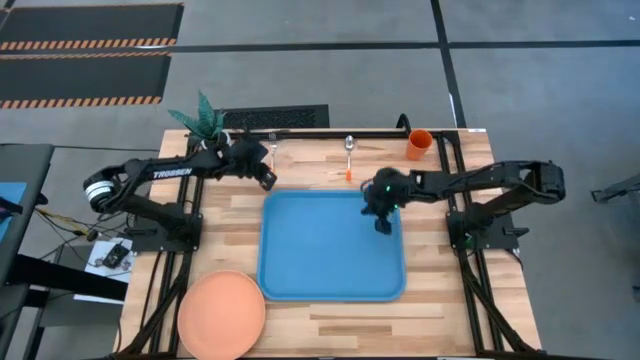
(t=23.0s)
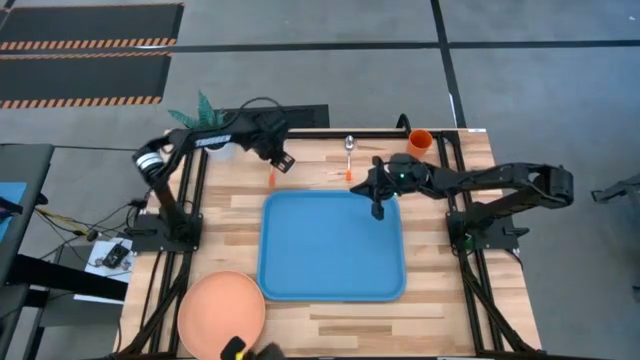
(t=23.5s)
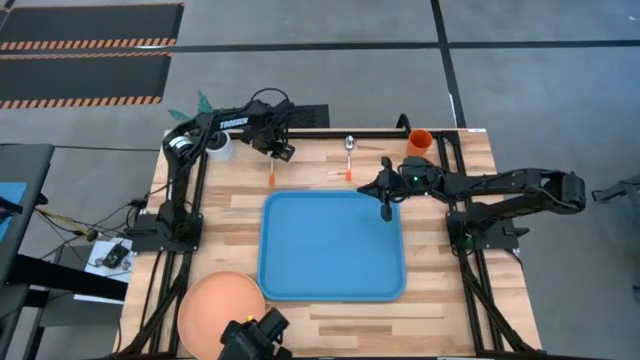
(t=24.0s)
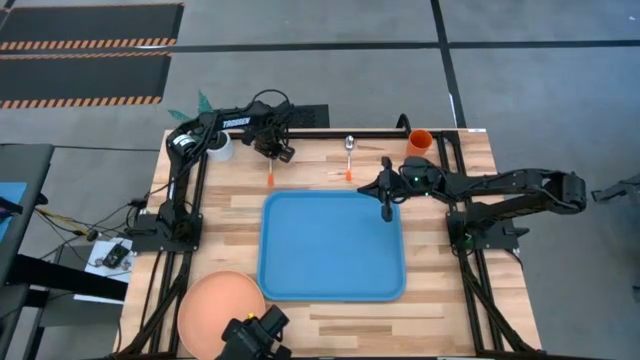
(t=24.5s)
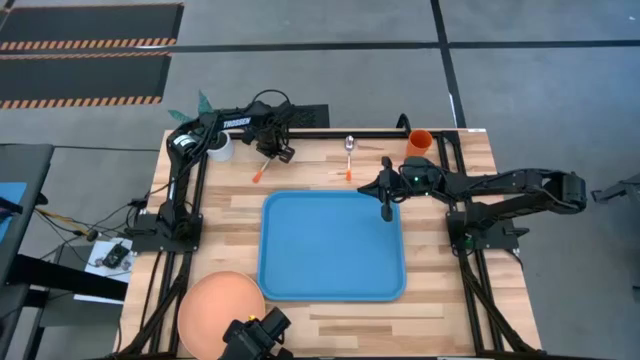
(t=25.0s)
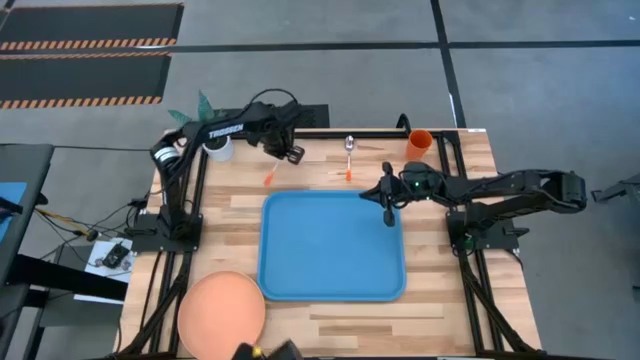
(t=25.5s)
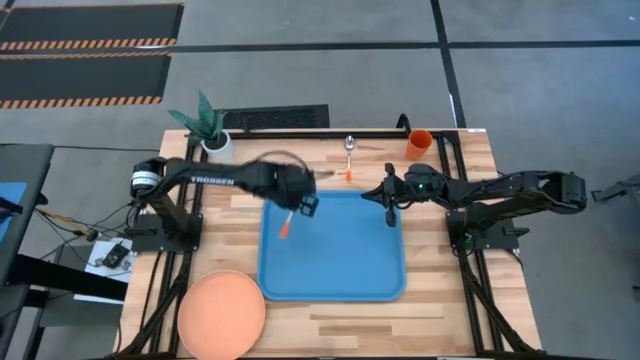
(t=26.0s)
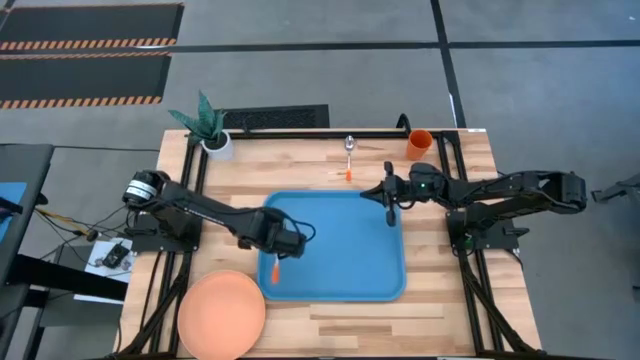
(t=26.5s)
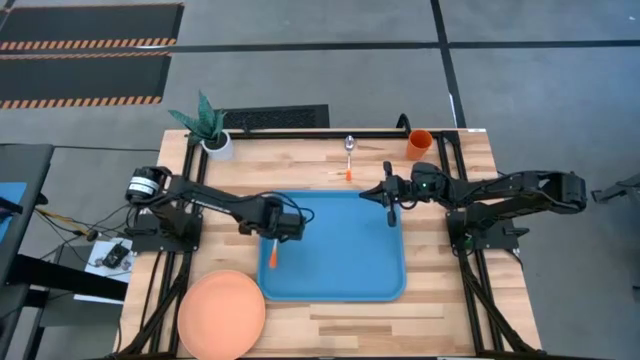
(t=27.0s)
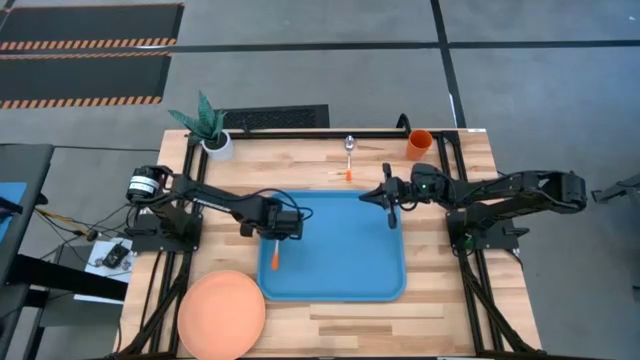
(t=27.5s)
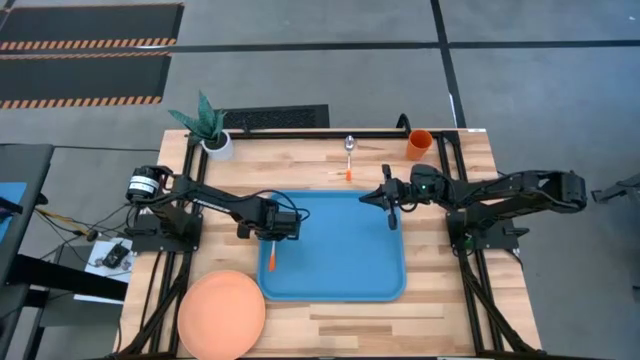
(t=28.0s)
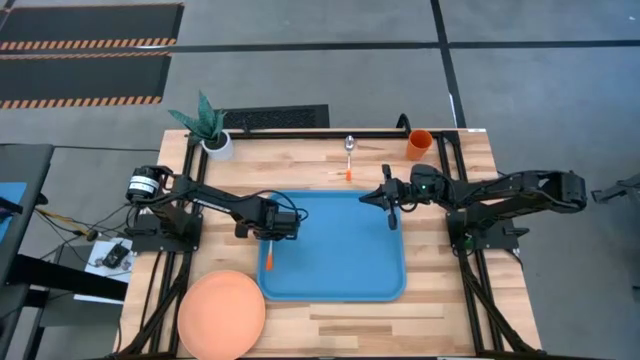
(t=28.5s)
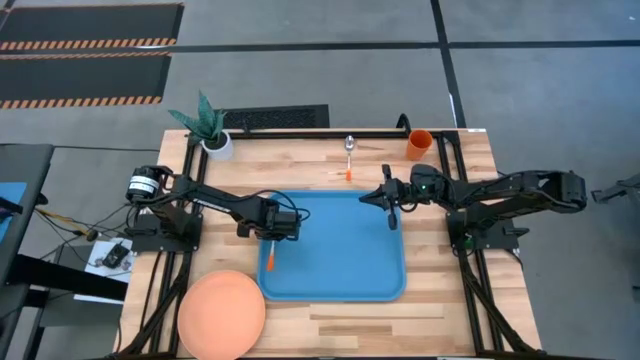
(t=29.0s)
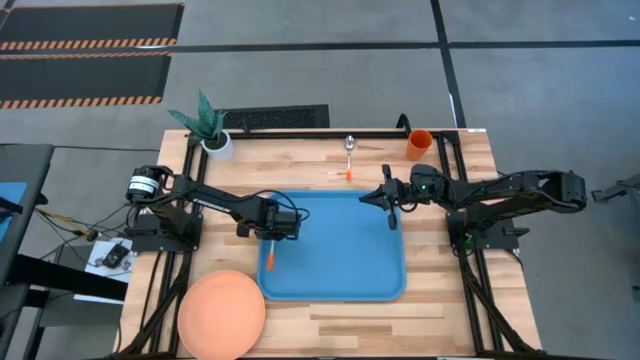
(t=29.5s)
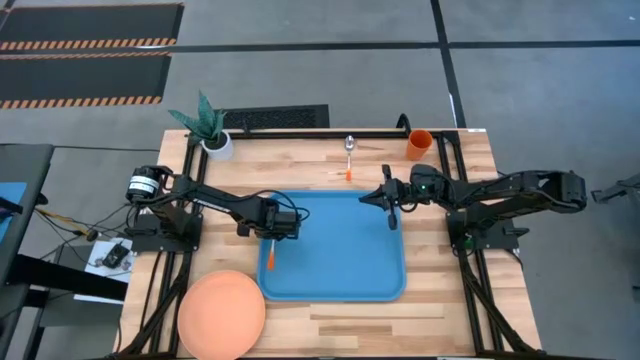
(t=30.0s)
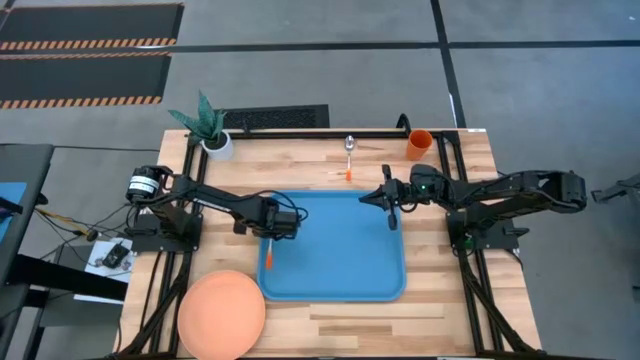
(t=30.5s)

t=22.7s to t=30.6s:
Task: Pick and place plate/cup/fork/spoon on tray
Put the orange fork on the blue serving tray

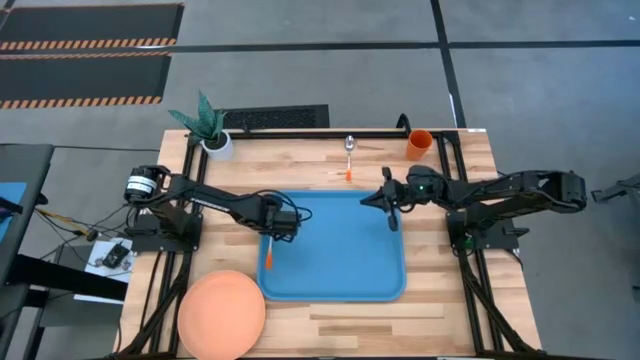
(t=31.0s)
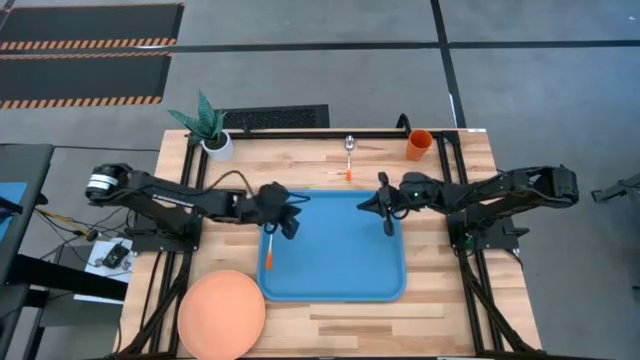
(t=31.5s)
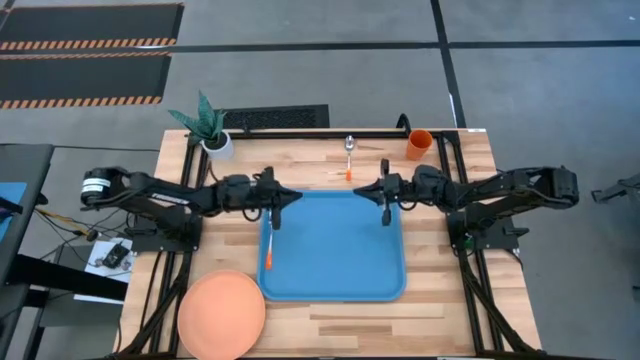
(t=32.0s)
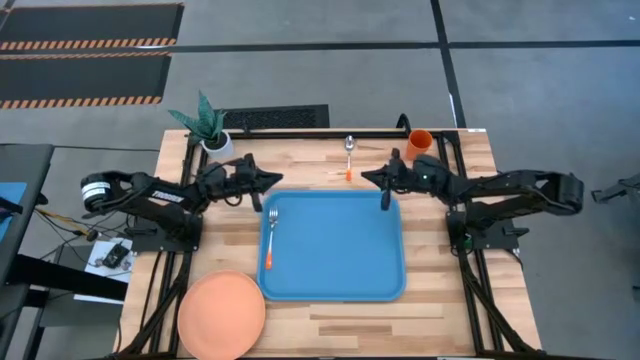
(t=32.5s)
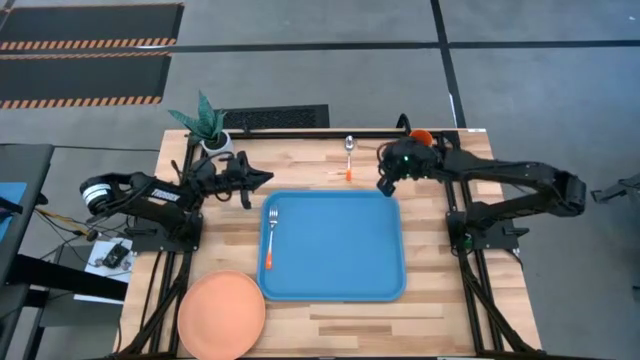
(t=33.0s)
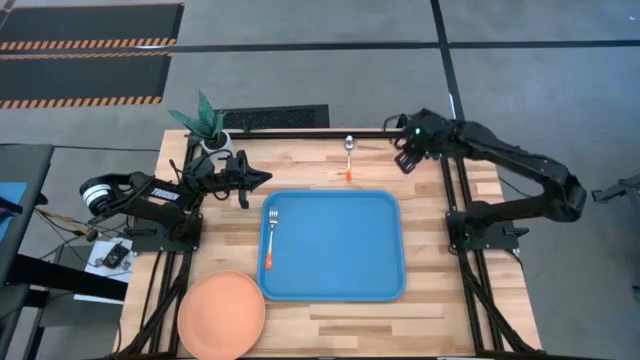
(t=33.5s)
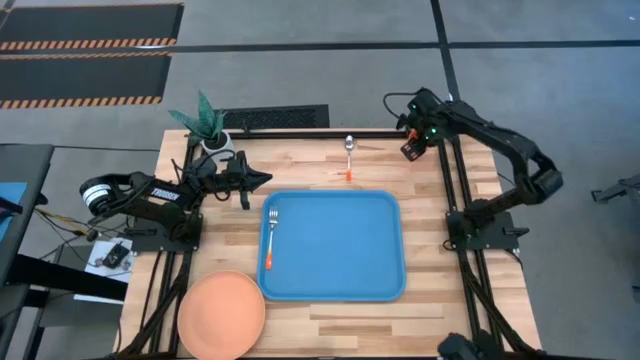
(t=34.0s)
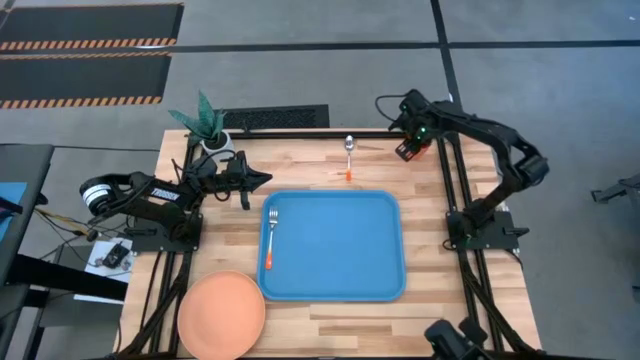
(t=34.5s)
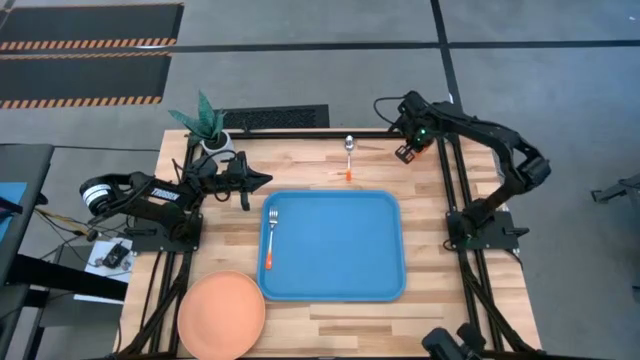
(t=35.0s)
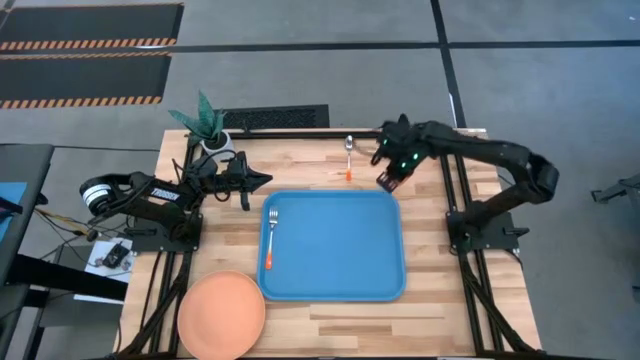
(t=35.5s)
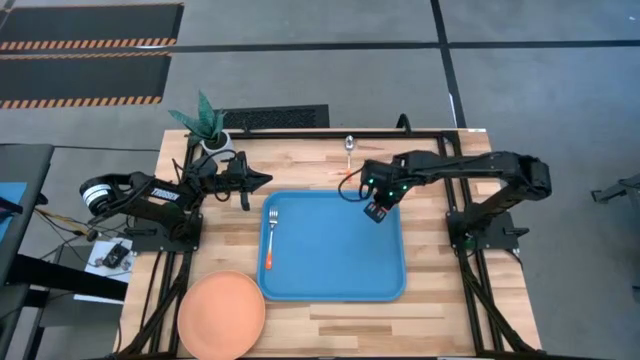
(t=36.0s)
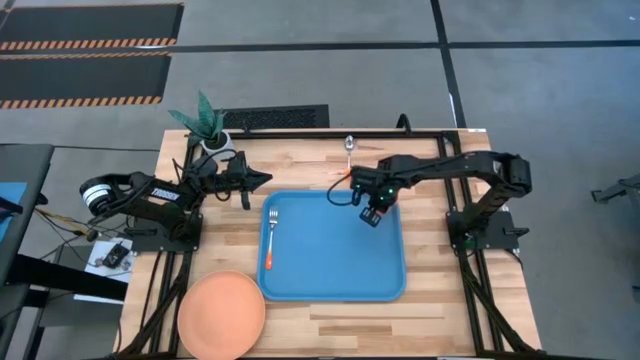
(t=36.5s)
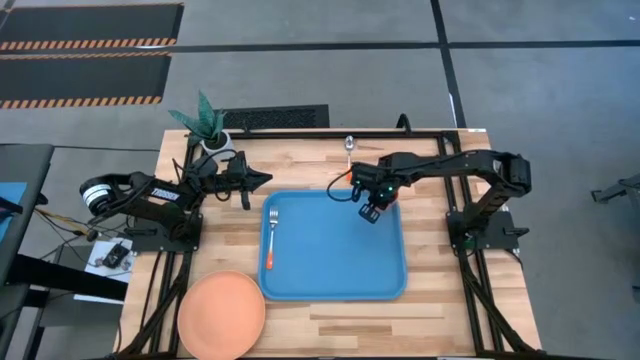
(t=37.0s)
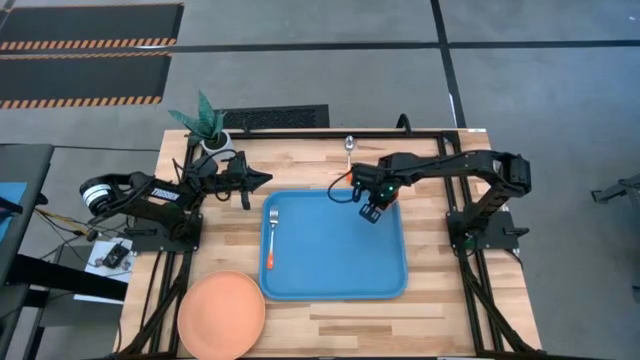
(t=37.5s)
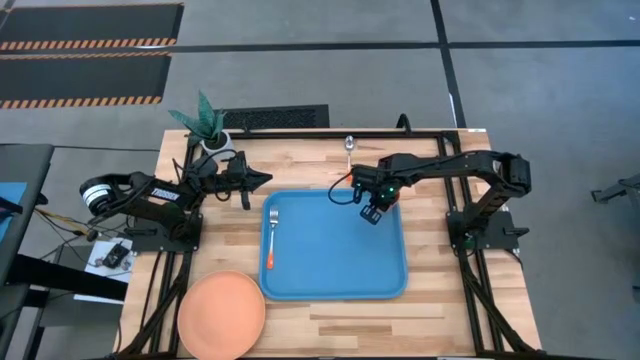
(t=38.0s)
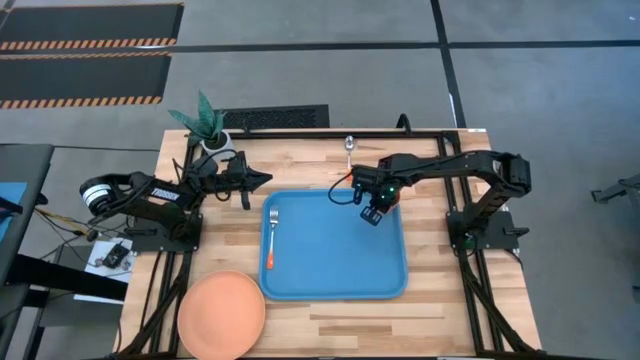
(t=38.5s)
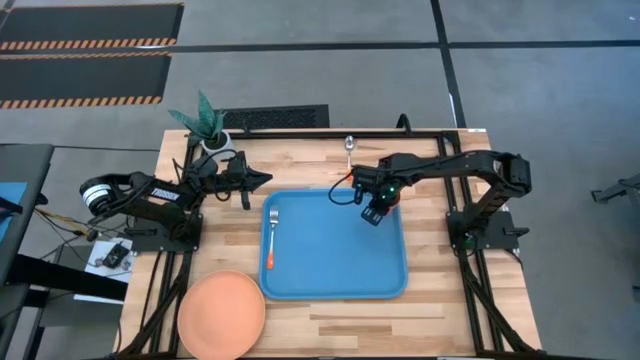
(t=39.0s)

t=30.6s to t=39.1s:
Put the orange cup on the top right of the blue serving tray
